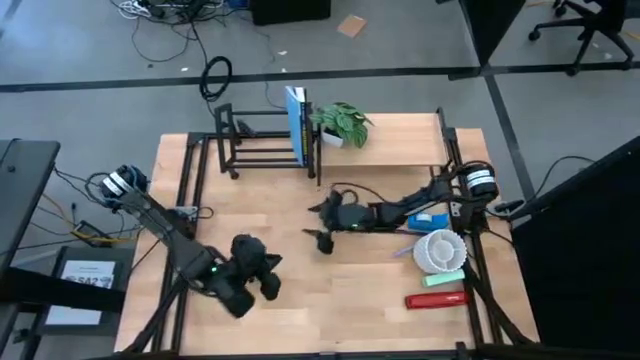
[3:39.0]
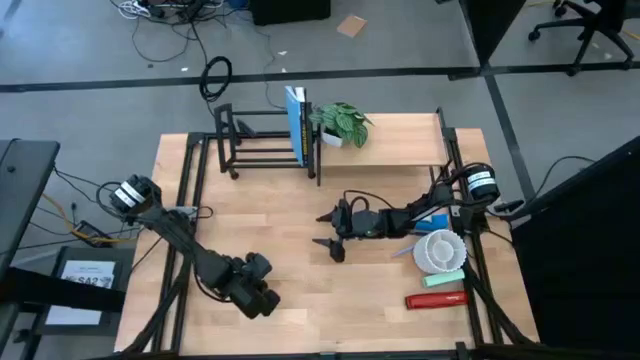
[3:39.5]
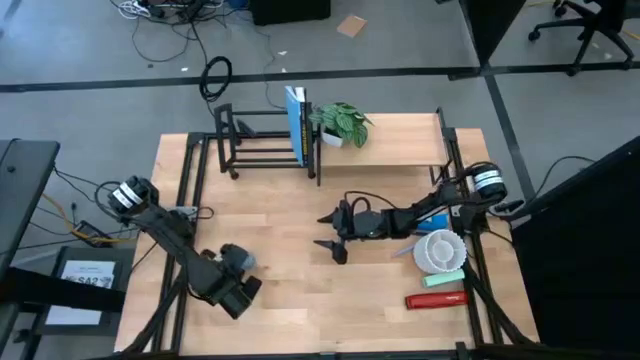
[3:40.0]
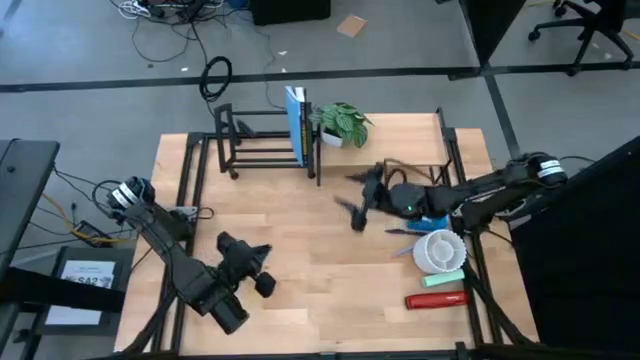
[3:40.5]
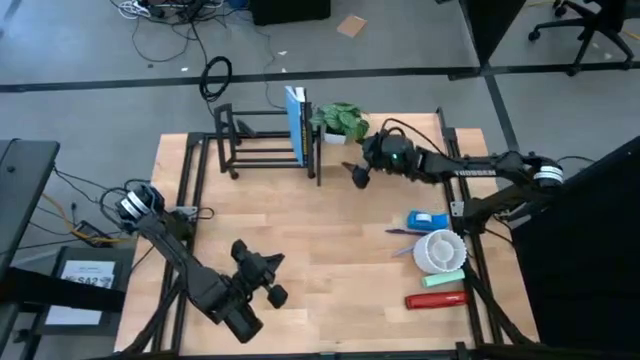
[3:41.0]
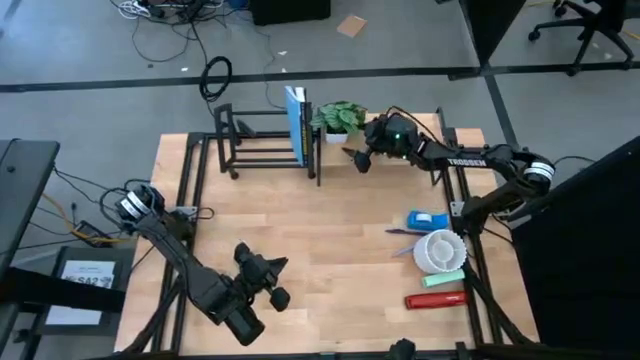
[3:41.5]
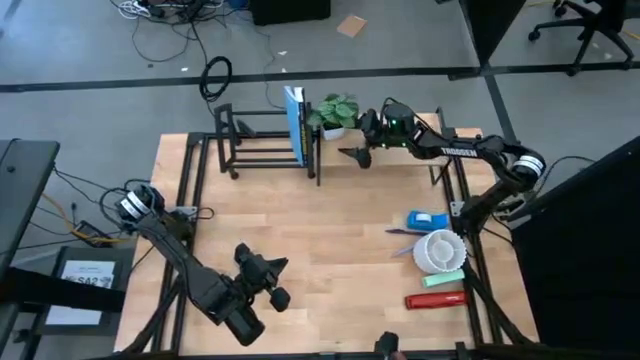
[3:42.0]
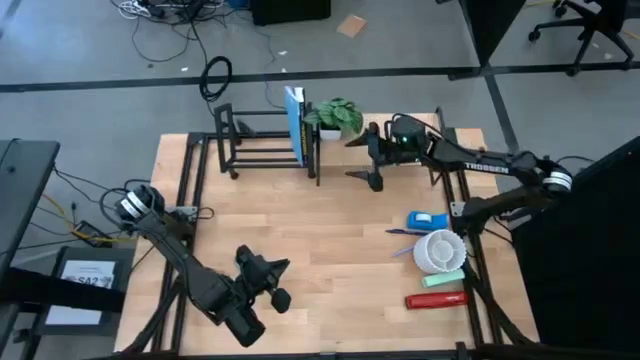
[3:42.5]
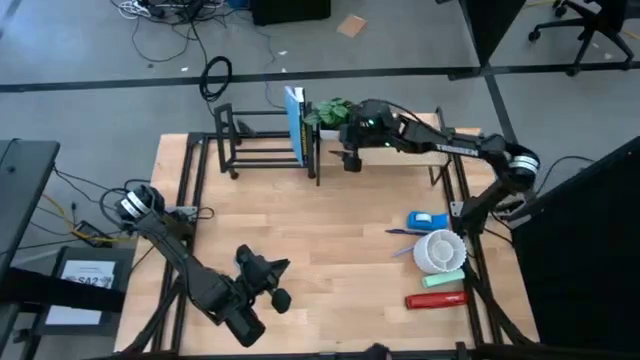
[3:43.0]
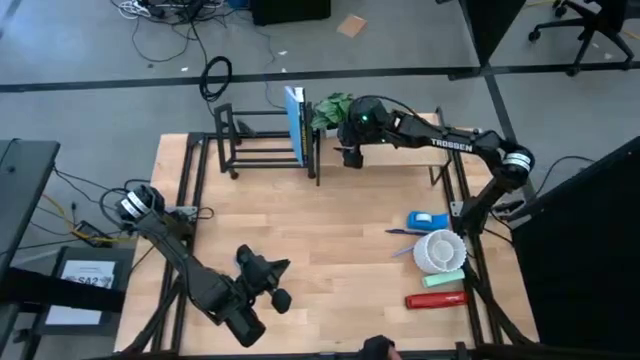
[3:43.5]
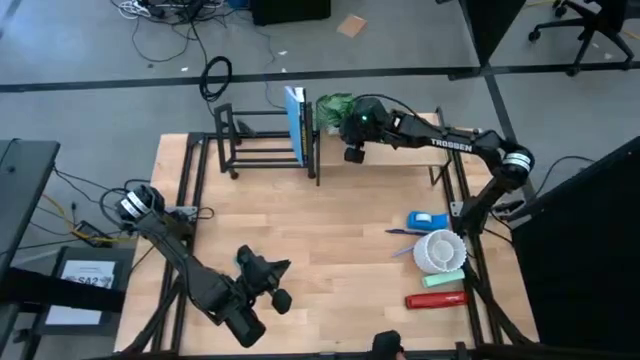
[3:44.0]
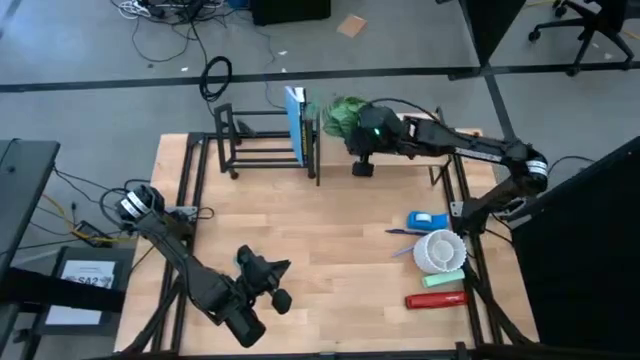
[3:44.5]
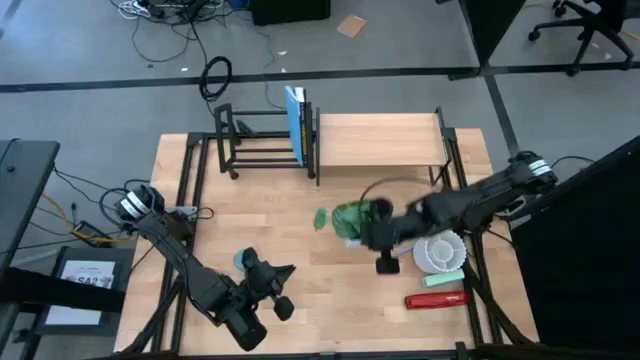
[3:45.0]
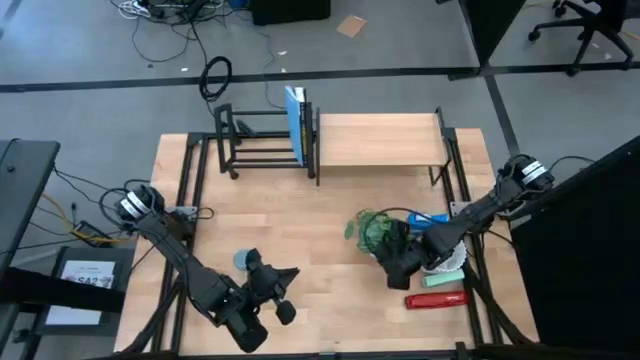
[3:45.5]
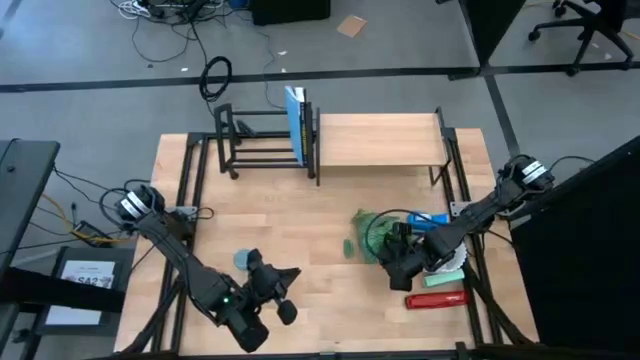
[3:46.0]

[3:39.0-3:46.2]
Task: Stock shelves
Remove the flower pot from the shelf

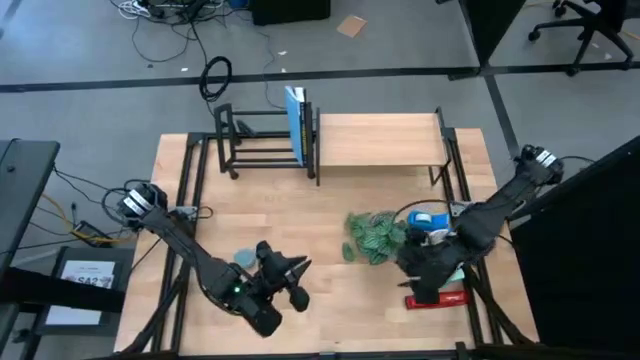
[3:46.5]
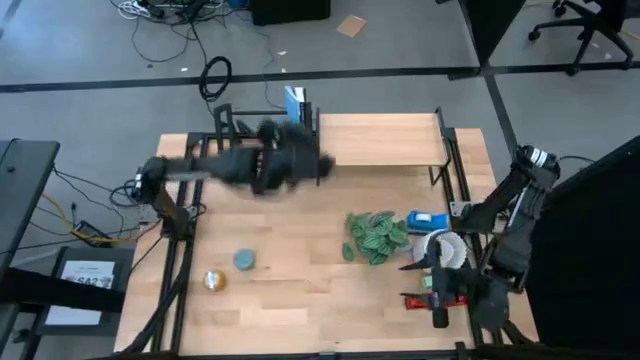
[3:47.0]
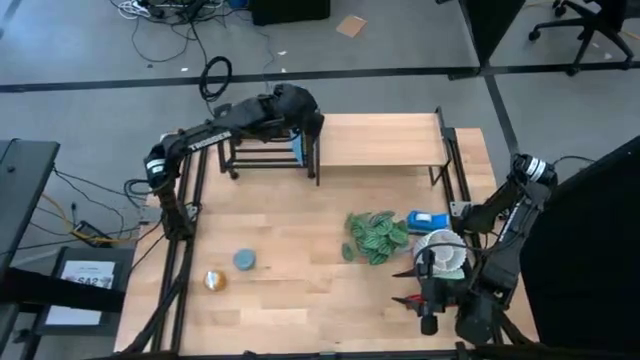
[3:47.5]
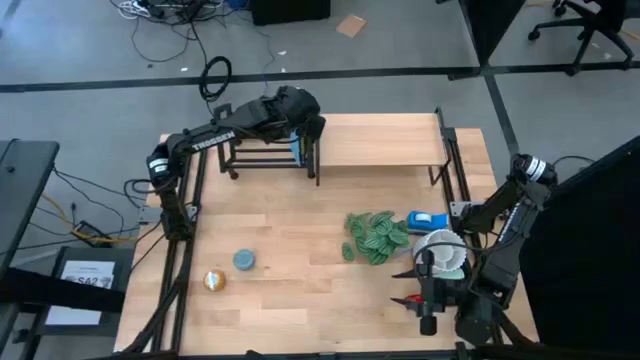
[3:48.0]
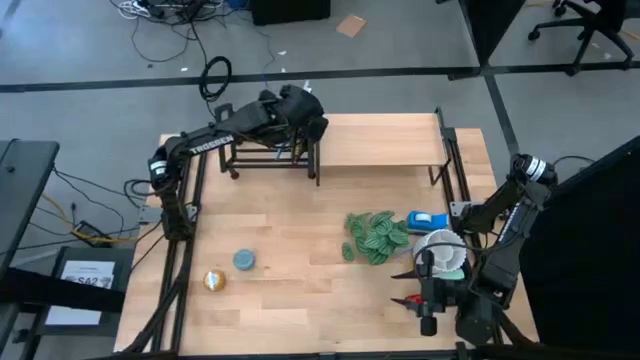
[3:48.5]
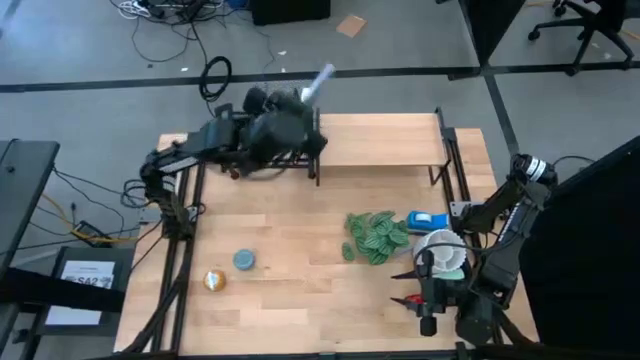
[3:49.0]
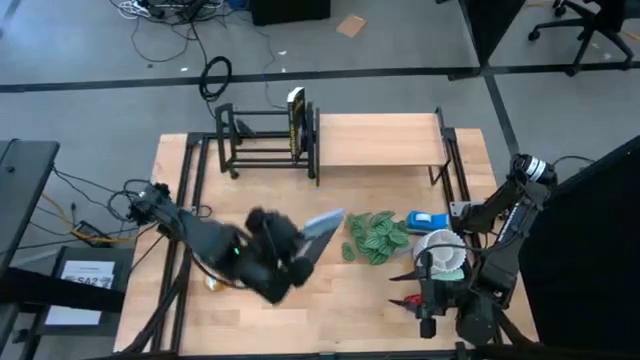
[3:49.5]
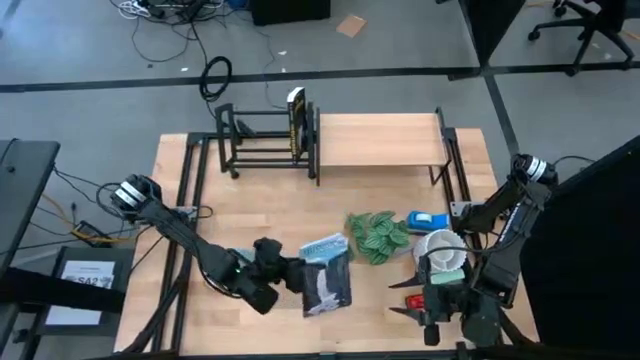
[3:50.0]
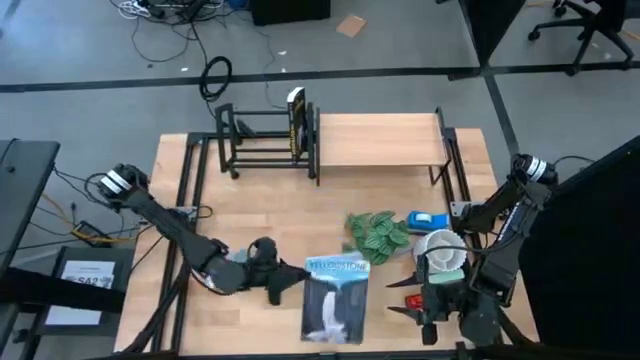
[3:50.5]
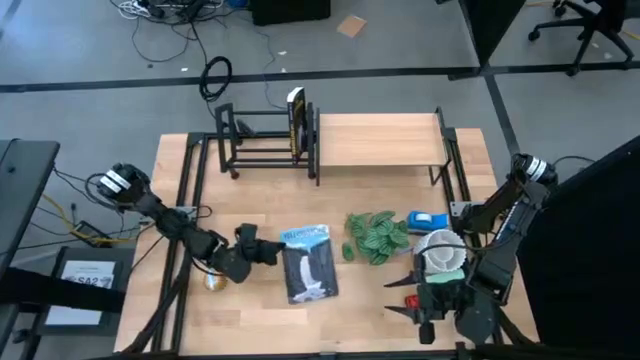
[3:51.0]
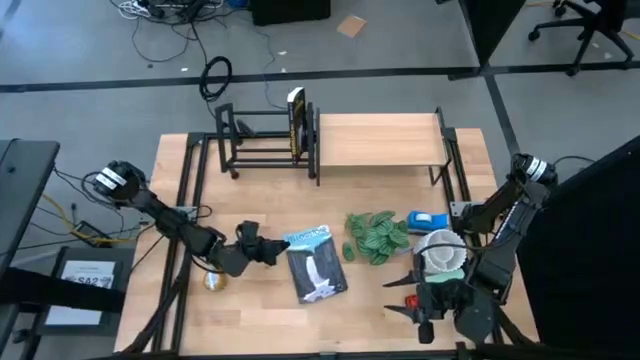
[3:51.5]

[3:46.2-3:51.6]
Remove the blue book from the black book shelf

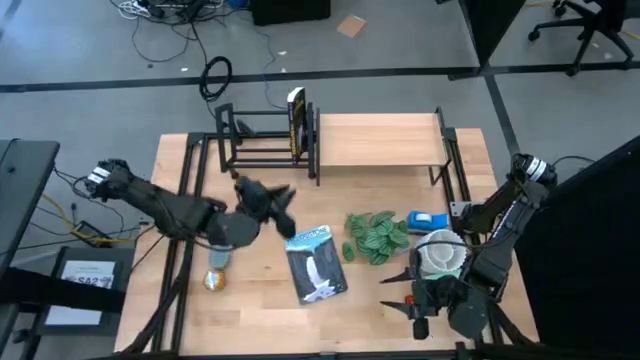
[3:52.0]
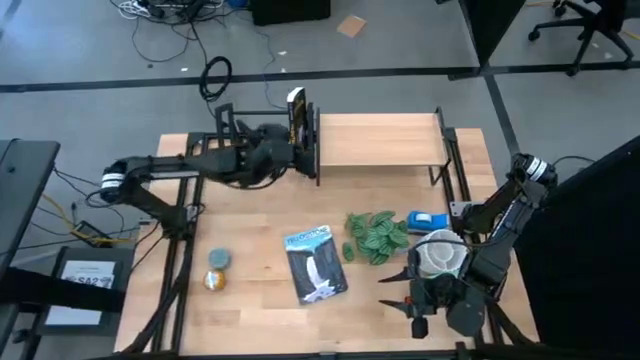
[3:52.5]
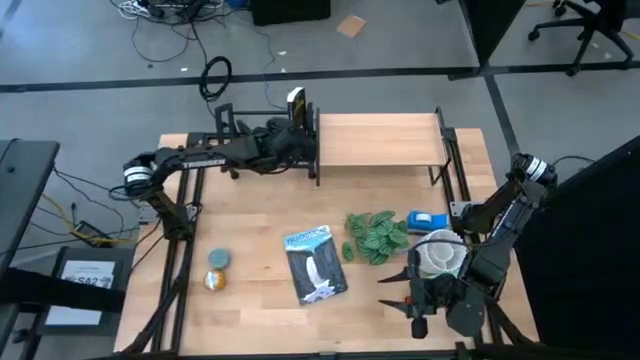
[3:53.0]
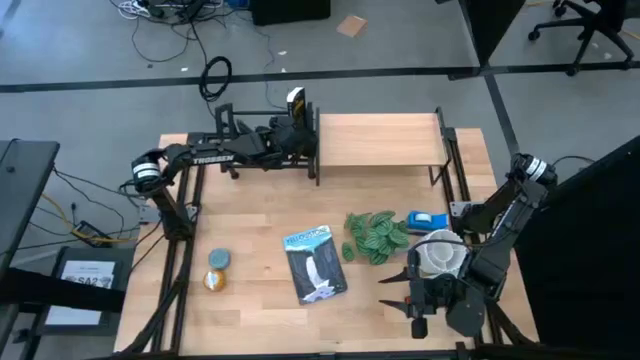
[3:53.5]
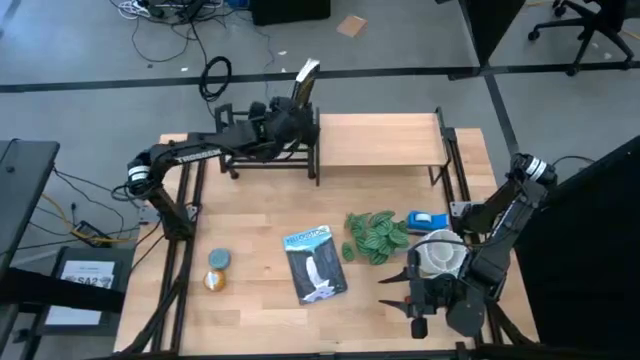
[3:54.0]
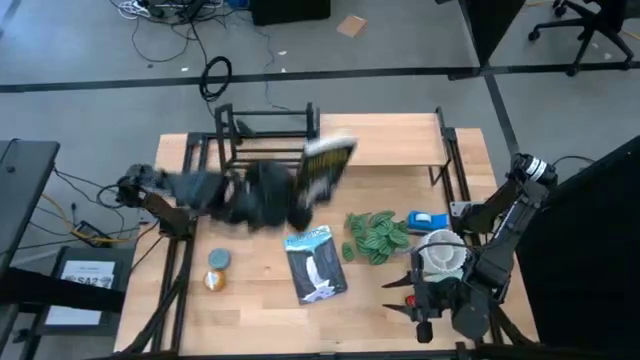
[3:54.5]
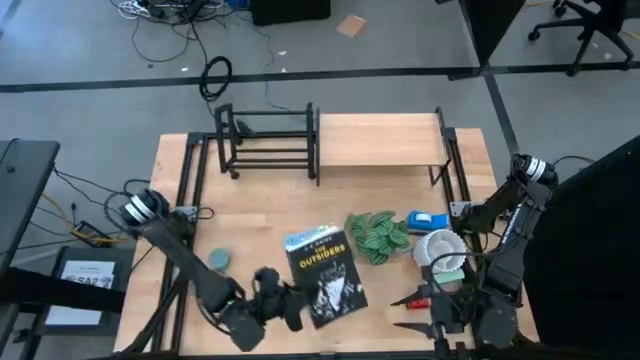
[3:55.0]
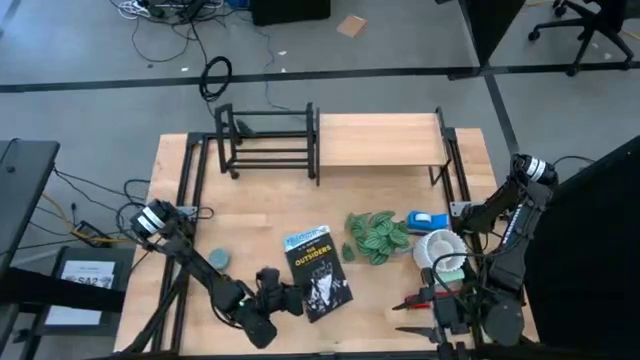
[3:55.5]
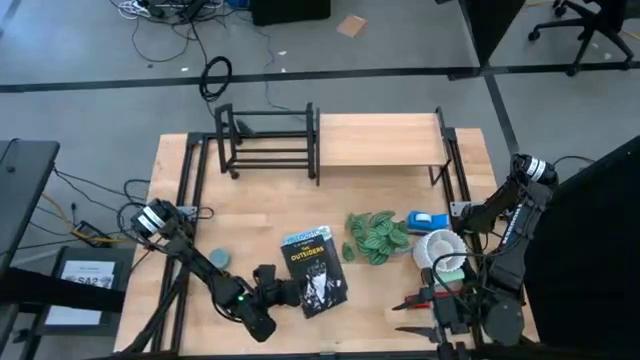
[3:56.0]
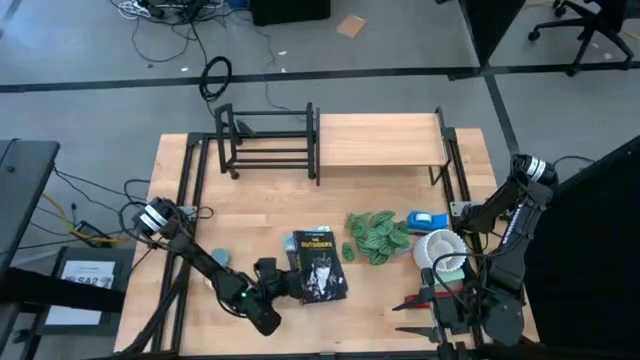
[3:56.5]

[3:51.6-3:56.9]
Remove the black book from the black book shelf

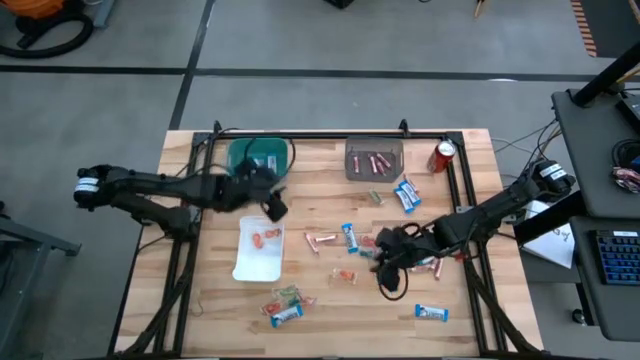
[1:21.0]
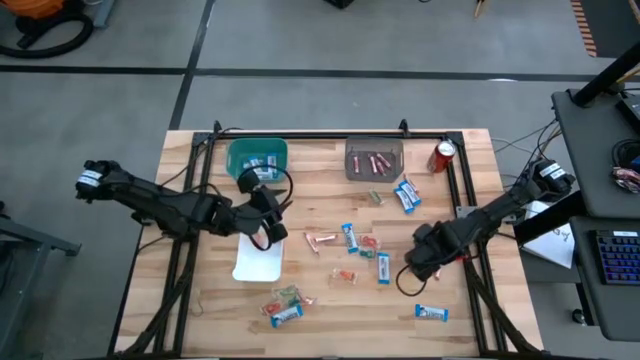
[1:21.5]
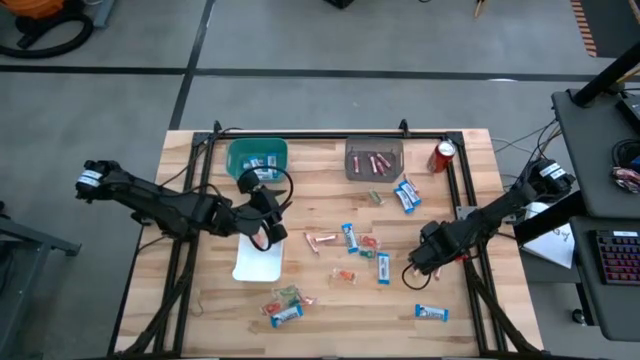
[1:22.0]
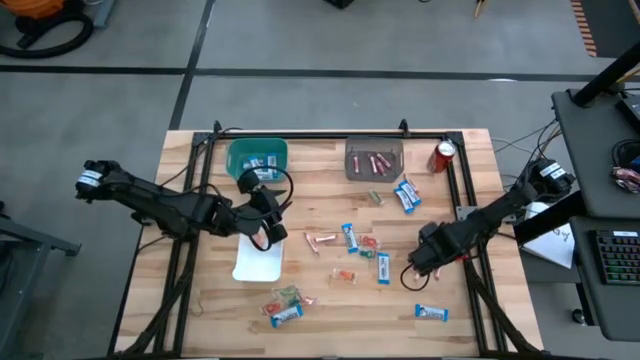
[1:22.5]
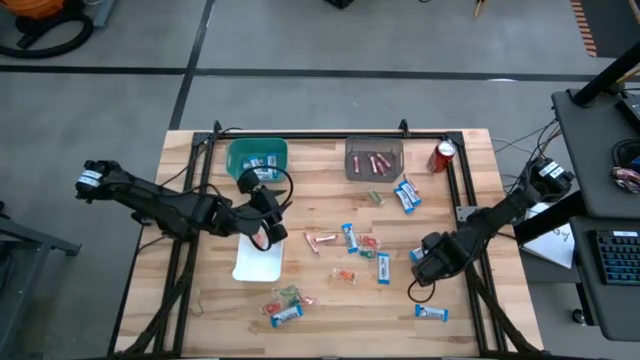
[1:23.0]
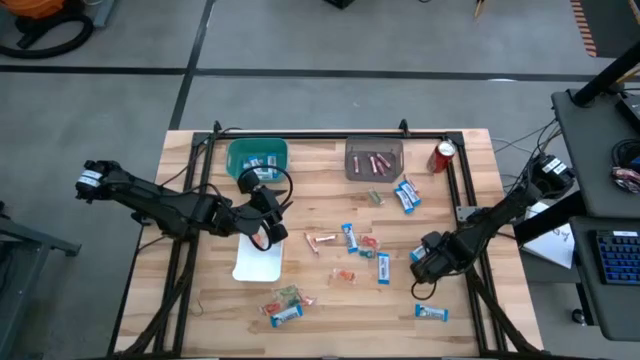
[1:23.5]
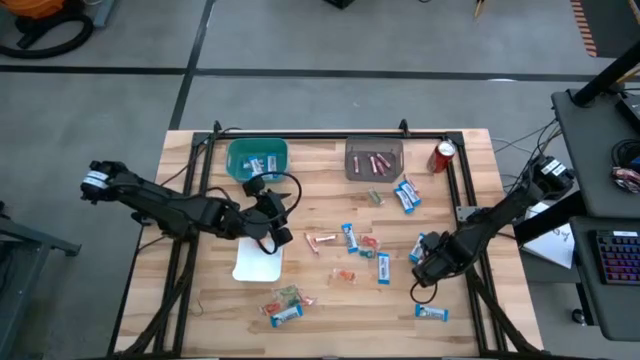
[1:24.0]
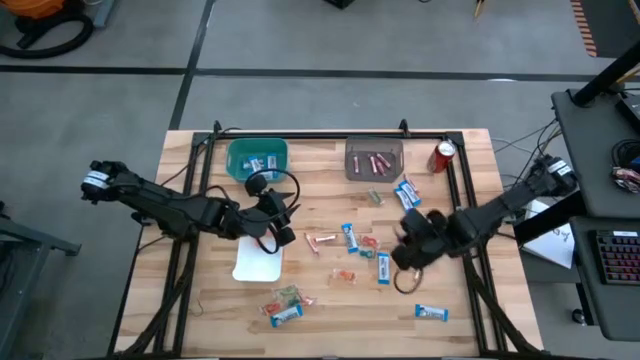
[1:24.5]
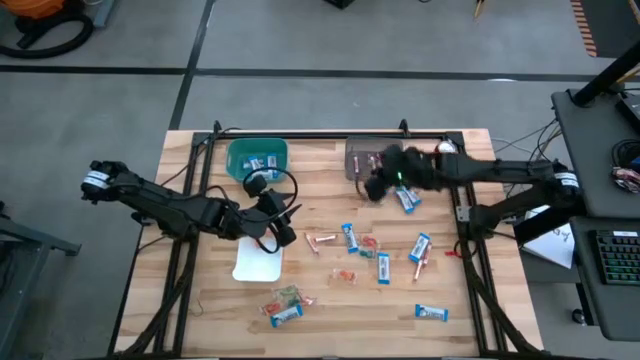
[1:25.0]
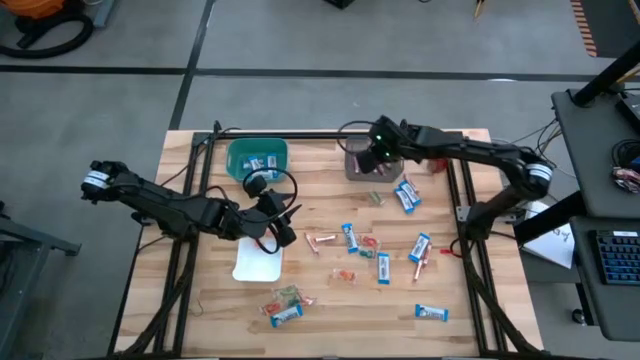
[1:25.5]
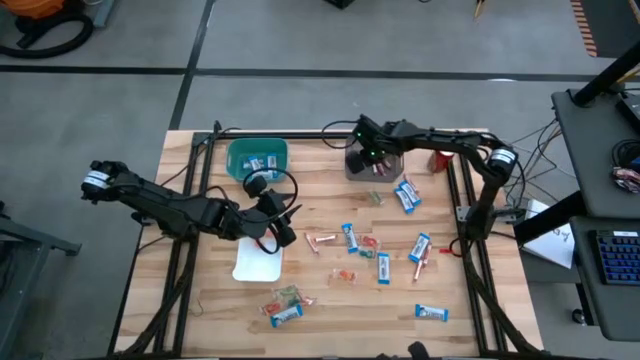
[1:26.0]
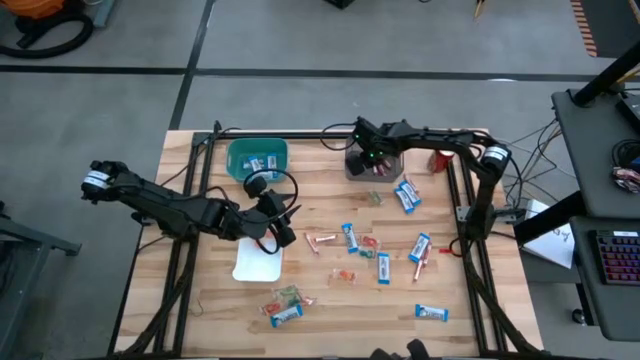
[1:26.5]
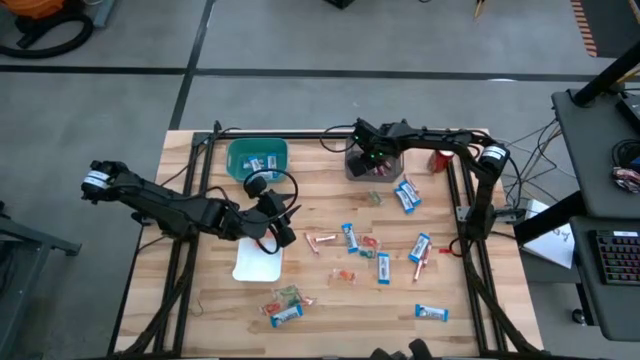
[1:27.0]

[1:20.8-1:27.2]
Task: Sort candy
Put the transparent candy rolls into the black bin
